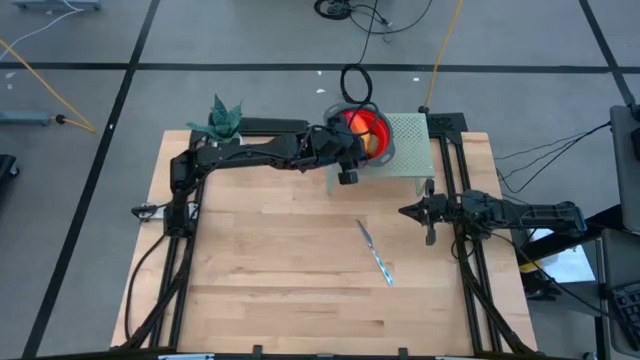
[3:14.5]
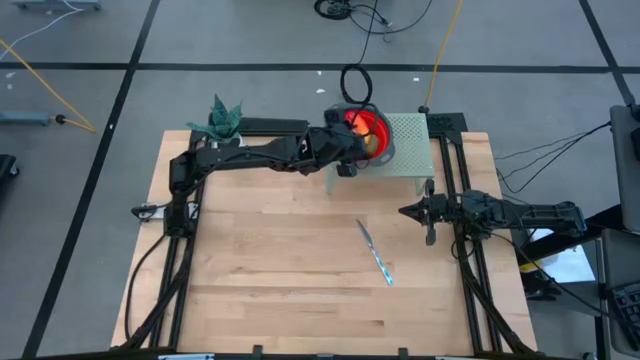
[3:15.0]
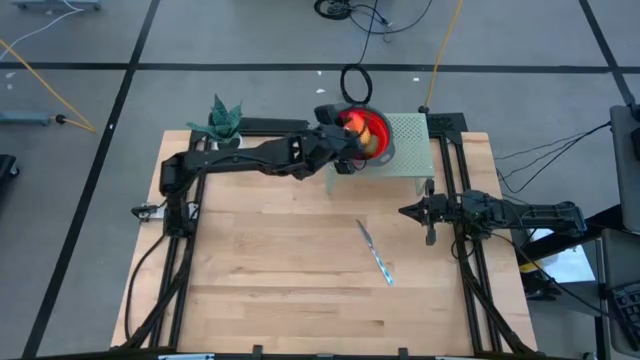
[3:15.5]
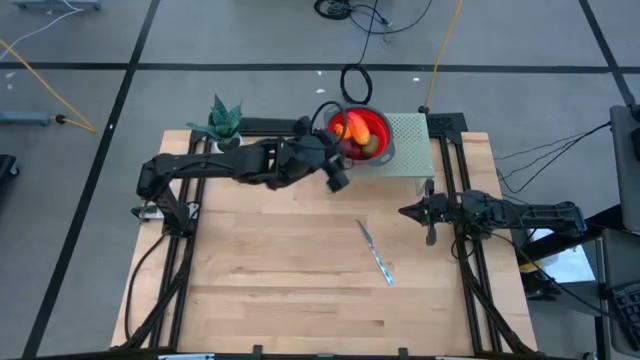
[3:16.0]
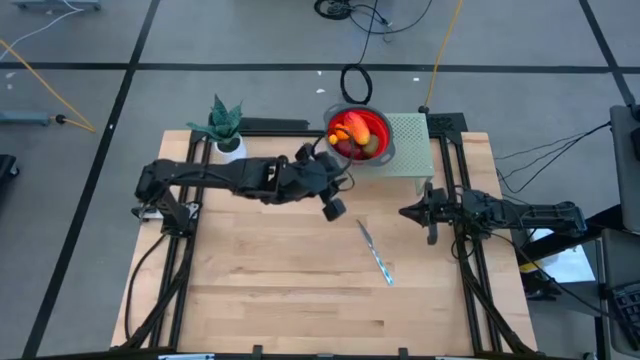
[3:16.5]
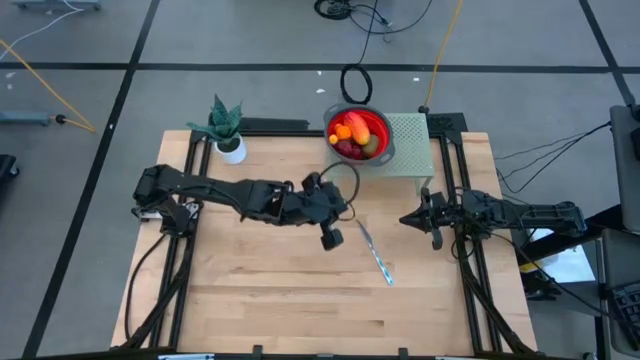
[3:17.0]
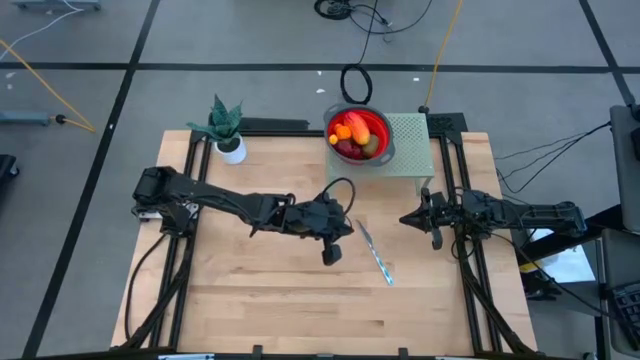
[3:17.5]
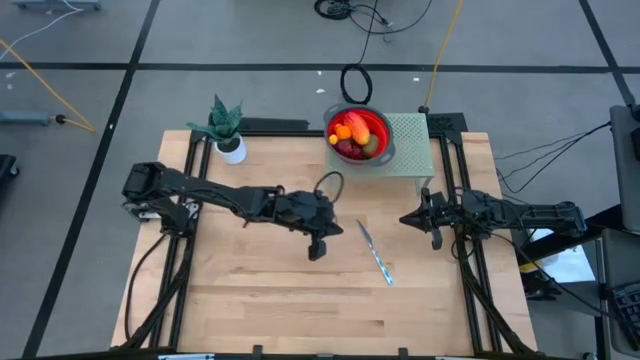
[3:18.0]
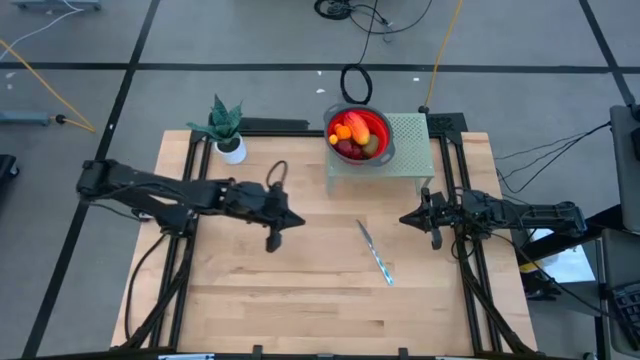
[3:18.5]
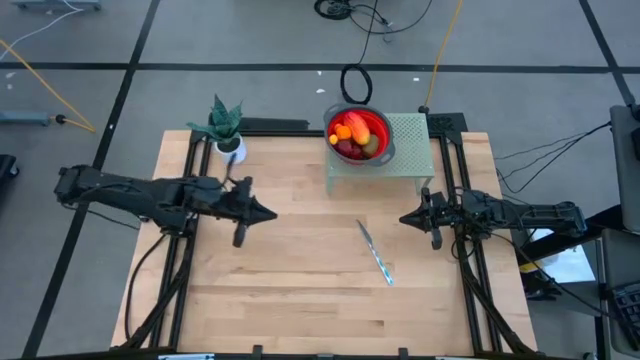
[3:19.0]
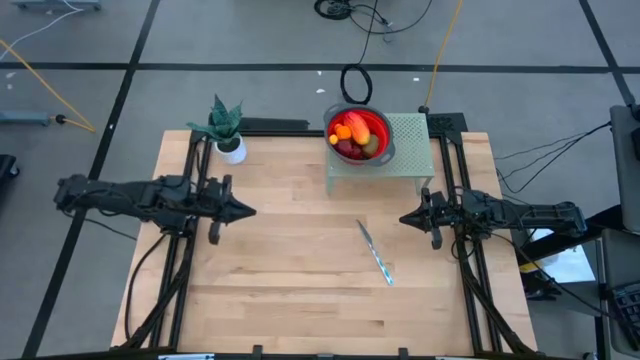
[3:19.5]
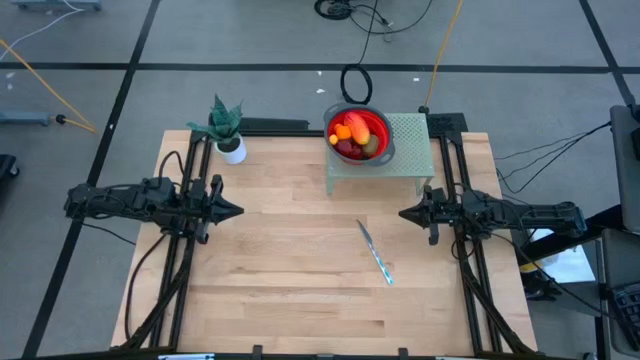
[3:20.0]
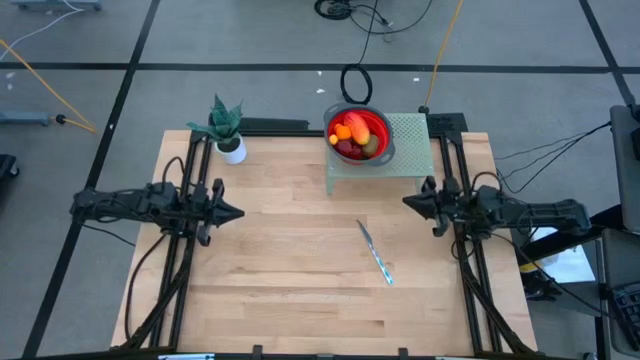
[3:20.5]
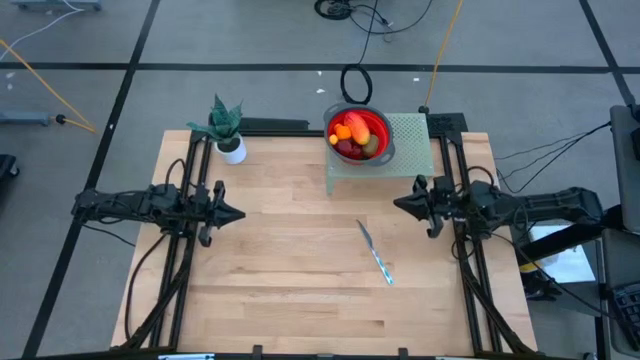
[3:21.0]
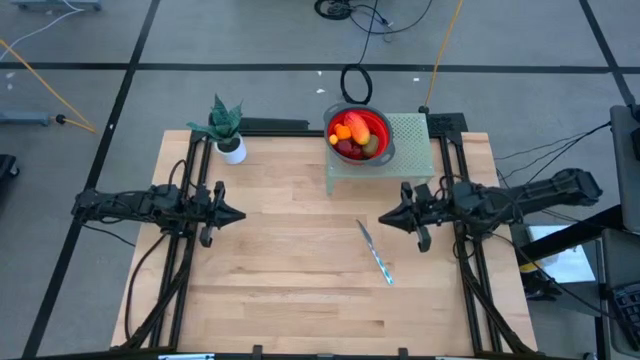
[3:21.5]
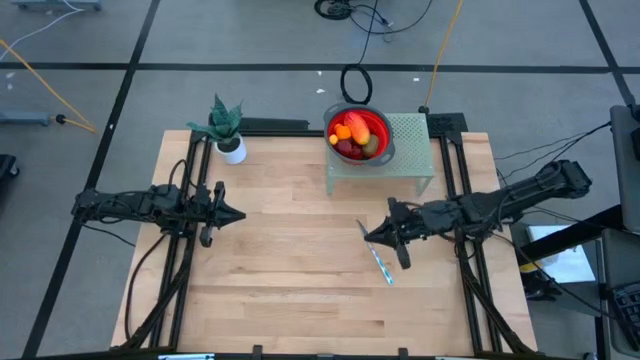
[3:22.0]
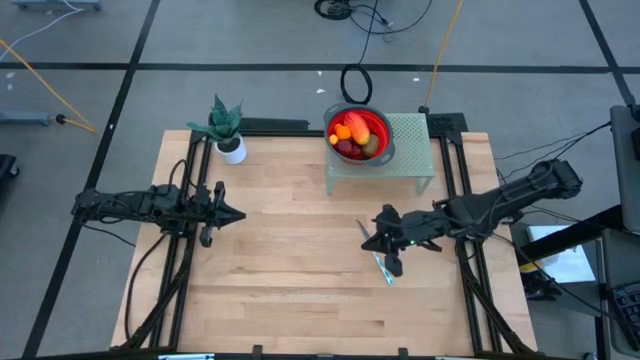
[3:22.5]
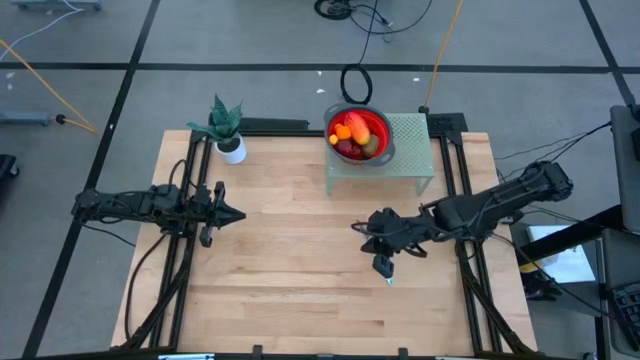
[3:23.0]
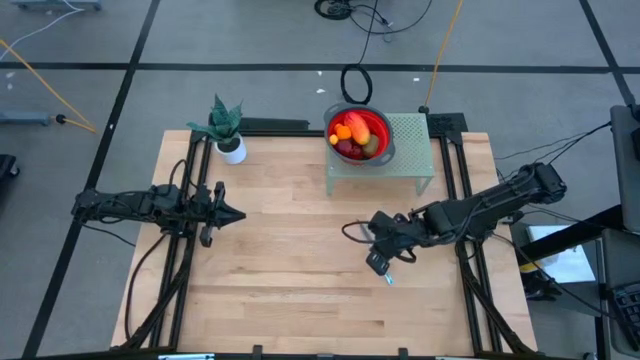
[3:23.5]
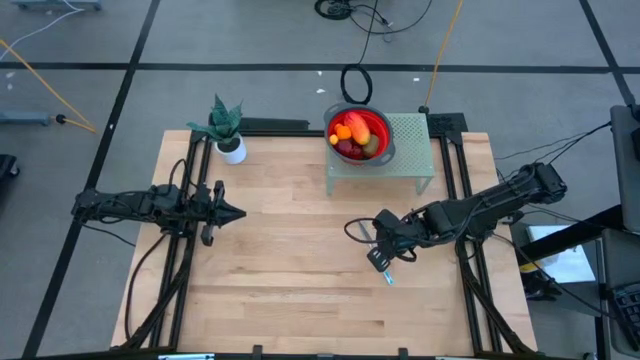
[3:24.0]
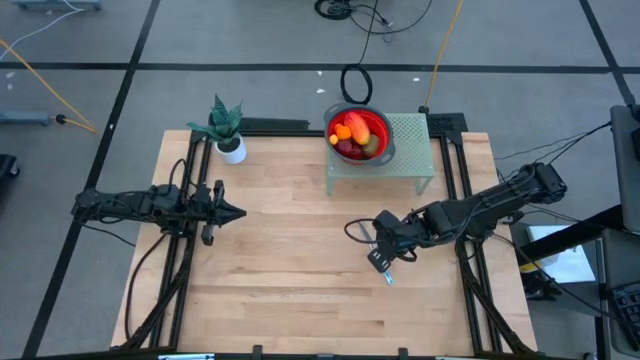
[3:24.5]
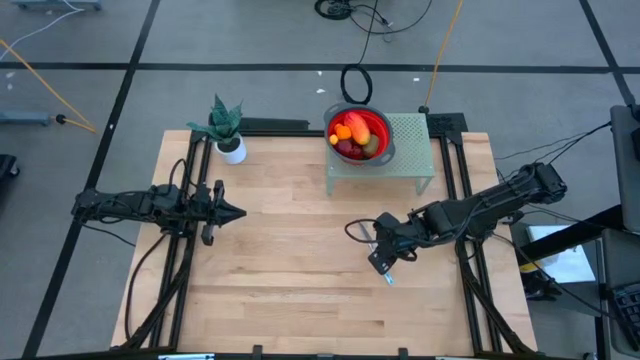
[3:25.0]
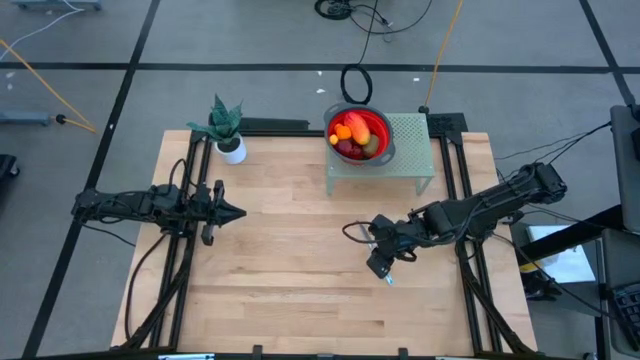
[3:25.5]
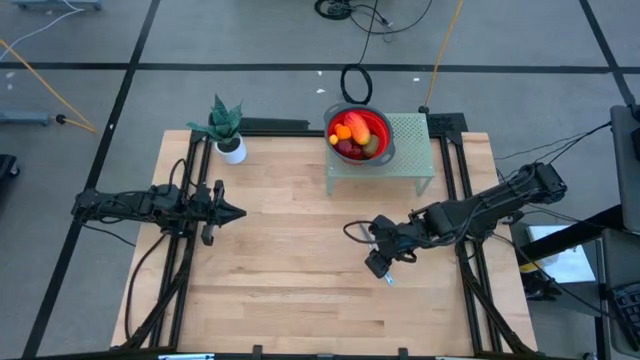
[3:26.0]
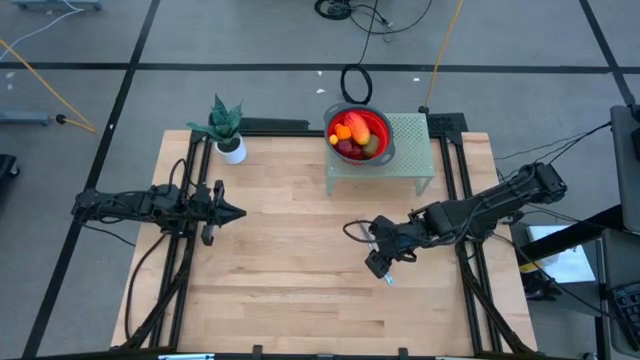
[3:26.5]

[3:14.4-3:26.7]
Task: Pick & Place Fruit
Put the blue white knife to the right of the red basket on the shelf

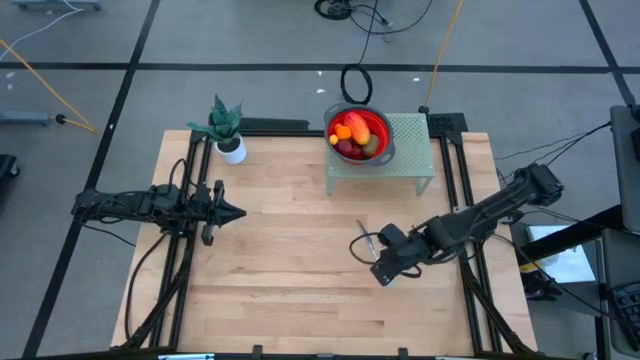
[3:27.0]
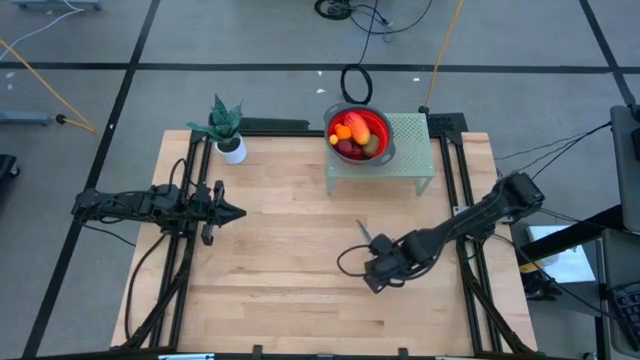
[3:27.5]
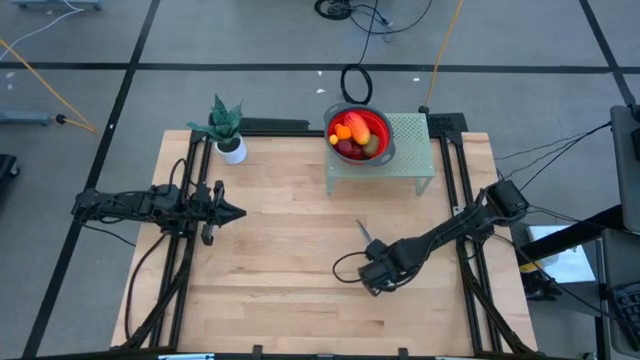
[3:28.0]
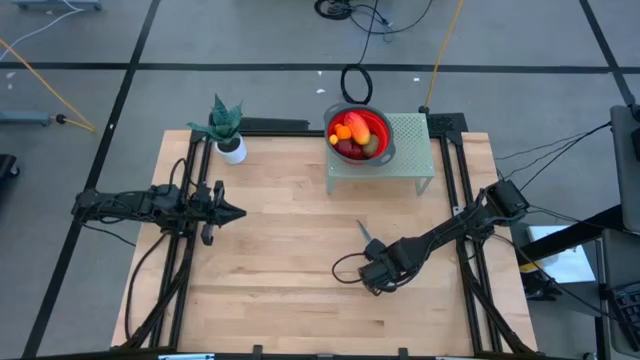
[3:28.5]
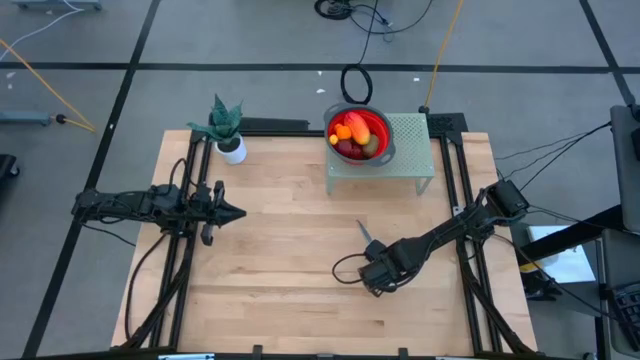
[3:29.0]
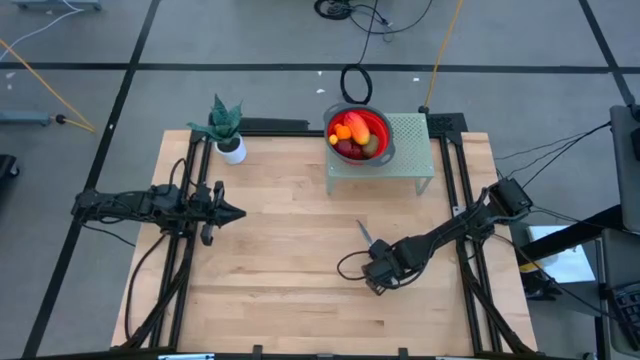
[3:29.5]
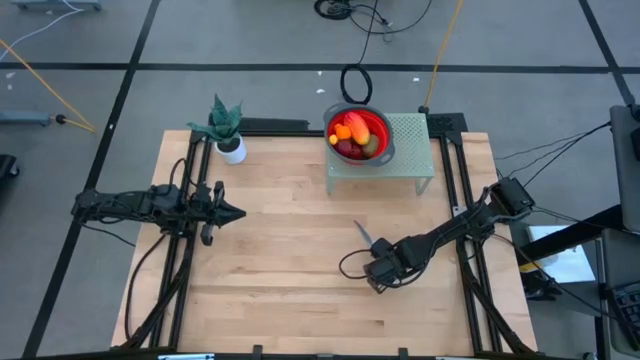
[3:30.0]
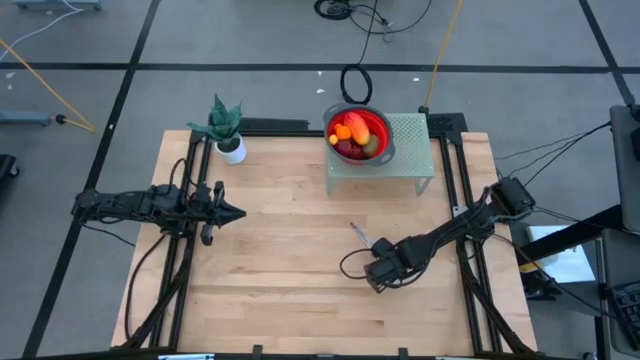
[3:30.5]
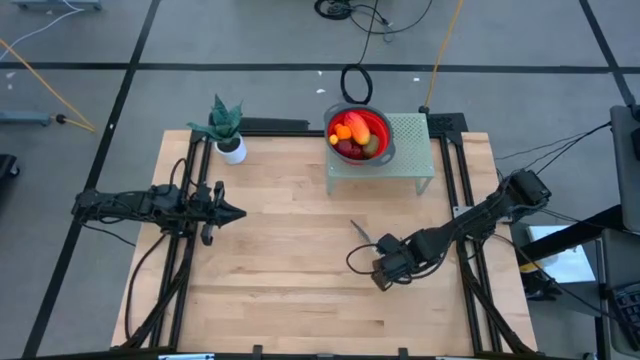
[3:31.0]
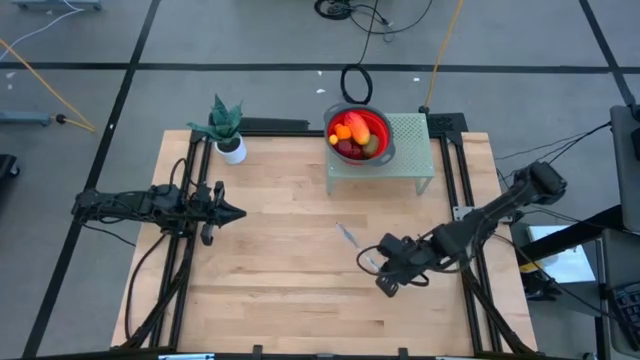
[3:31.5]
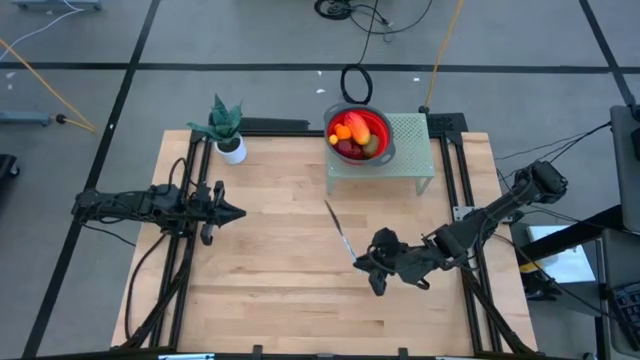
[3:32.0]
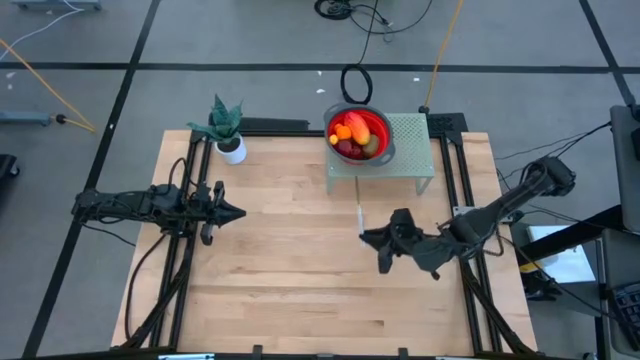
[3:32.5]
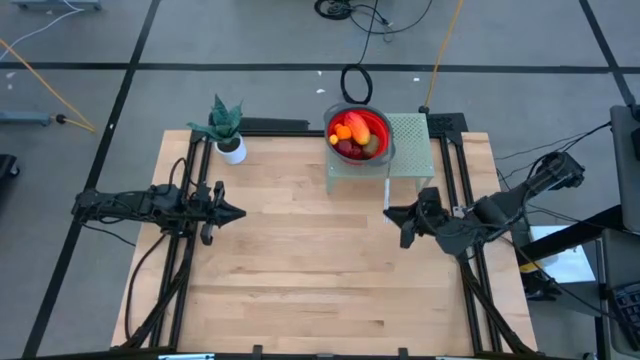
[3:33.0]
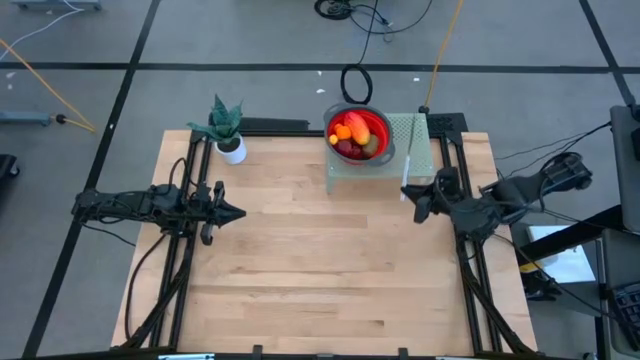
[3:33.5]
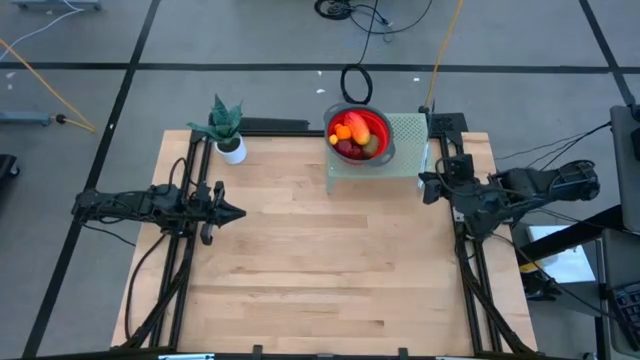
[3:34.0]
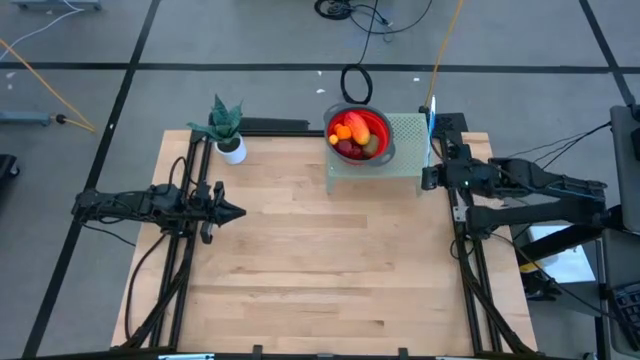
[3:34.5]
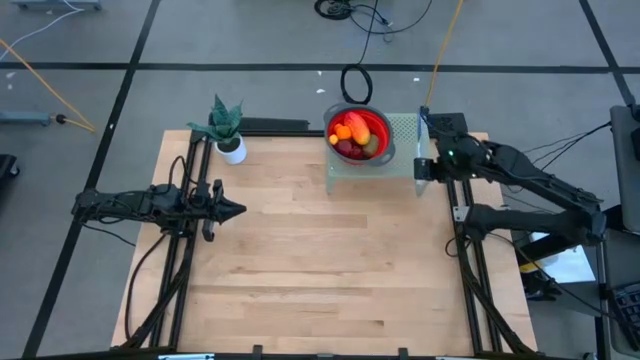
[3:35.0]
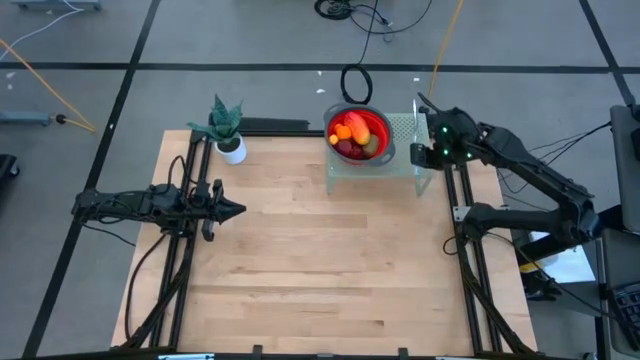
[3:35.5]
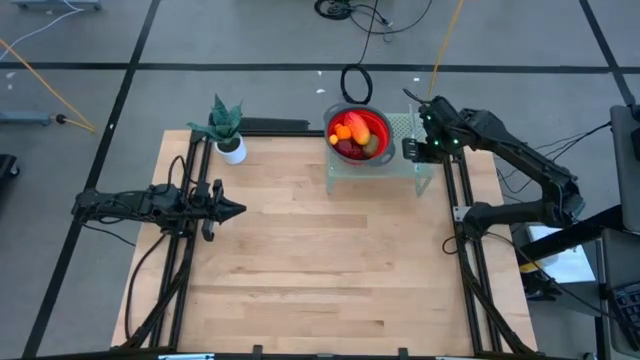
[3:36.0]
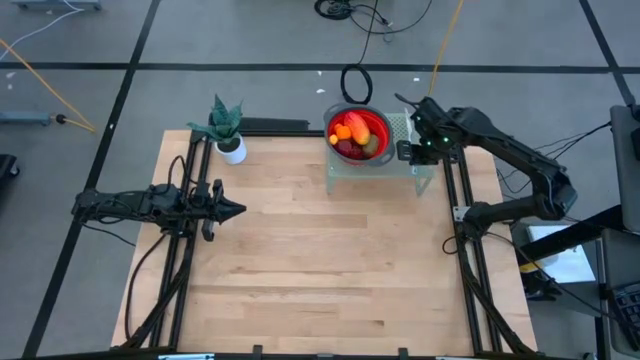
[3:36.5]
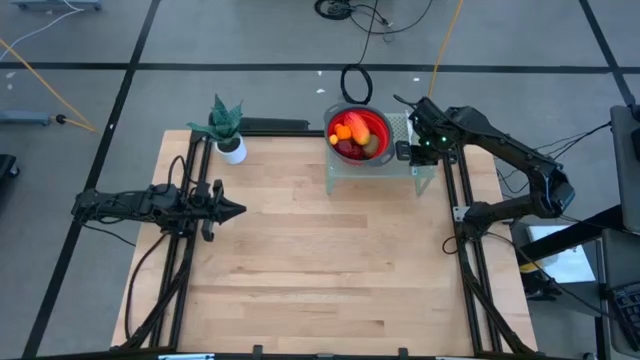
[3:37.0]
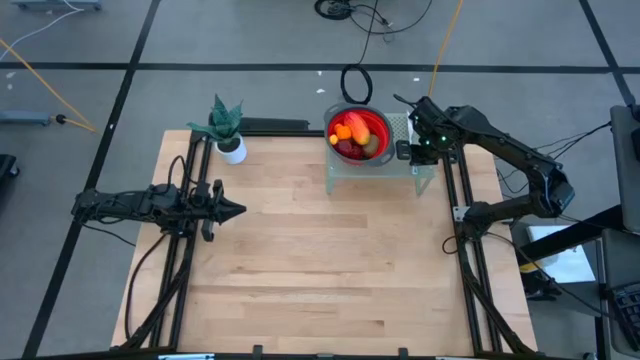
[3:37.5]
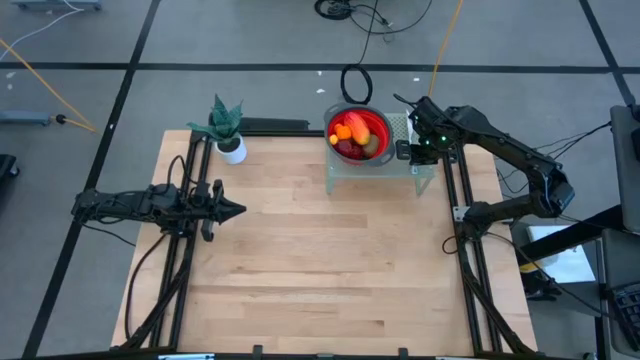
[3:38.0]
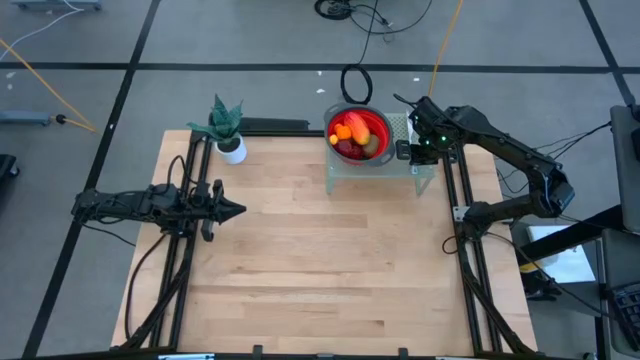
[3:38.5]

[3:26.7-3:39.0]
Put the blue white knife to the right of the red basket on the shelf
